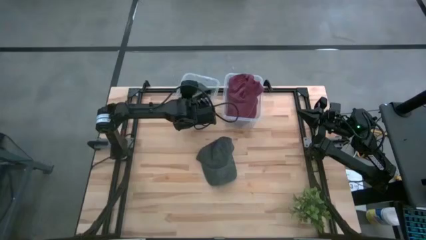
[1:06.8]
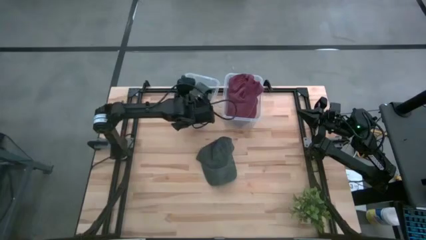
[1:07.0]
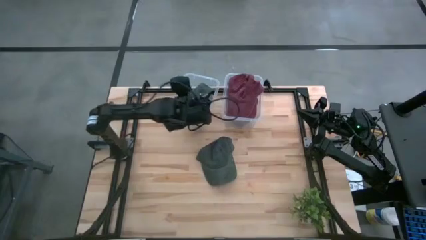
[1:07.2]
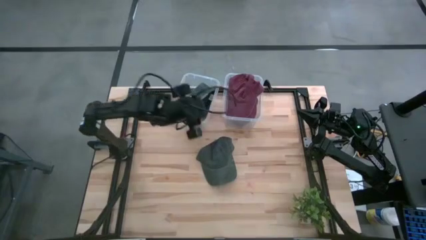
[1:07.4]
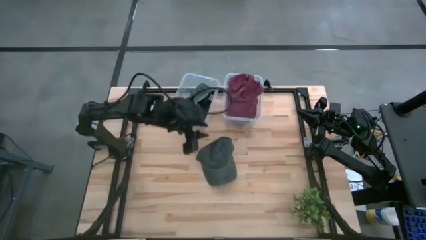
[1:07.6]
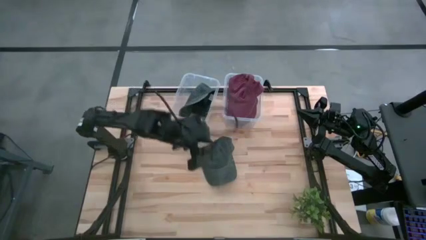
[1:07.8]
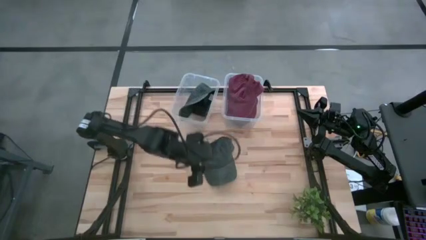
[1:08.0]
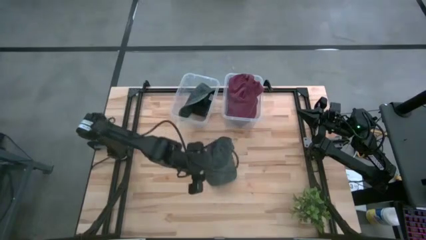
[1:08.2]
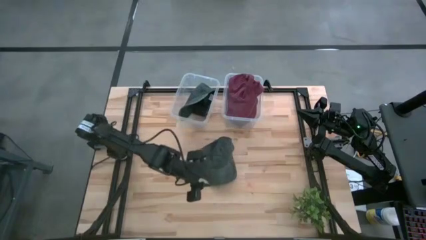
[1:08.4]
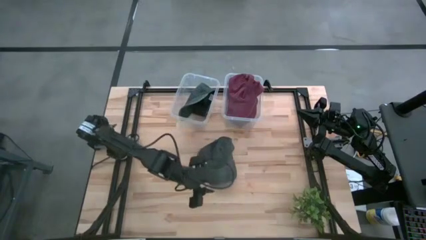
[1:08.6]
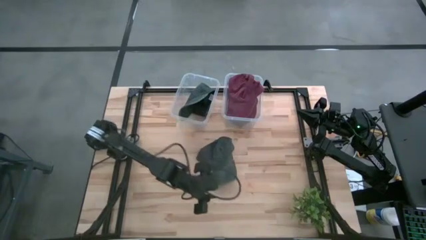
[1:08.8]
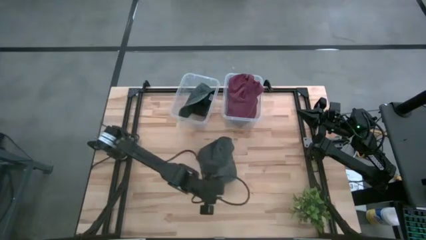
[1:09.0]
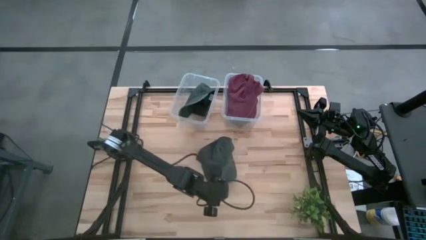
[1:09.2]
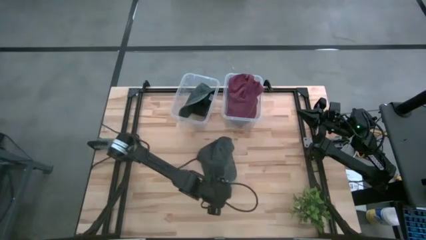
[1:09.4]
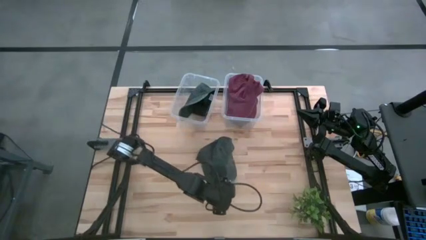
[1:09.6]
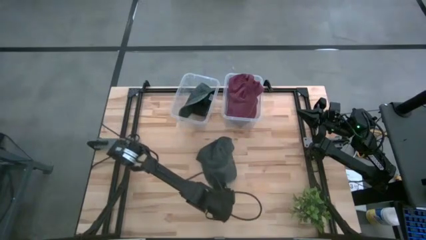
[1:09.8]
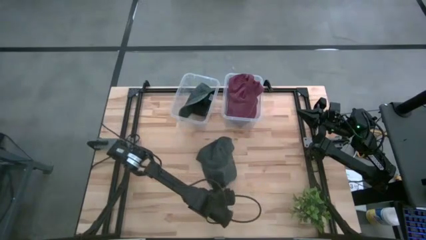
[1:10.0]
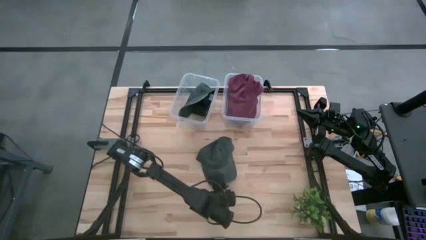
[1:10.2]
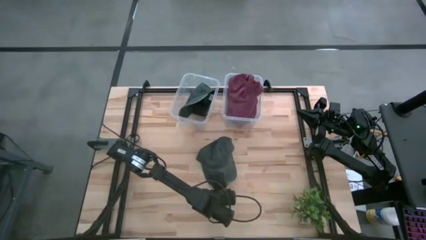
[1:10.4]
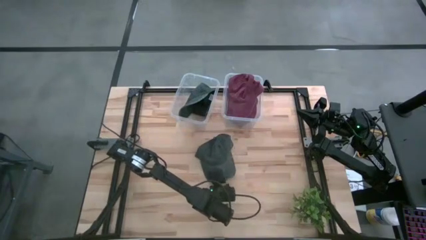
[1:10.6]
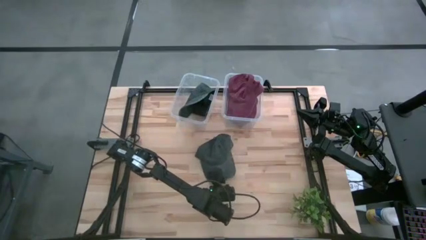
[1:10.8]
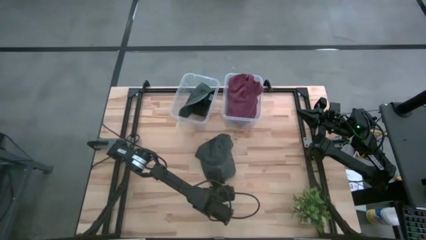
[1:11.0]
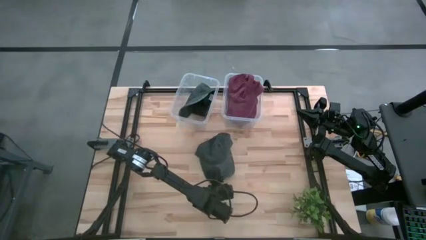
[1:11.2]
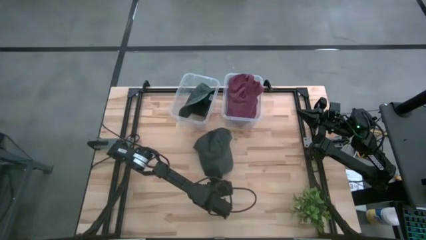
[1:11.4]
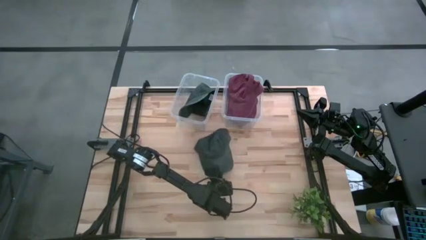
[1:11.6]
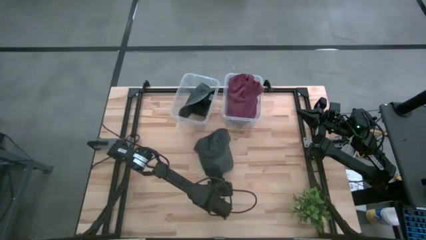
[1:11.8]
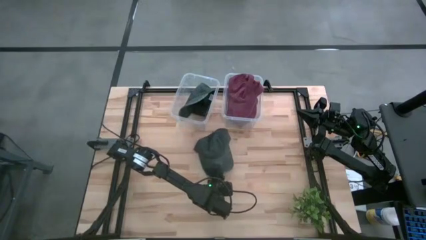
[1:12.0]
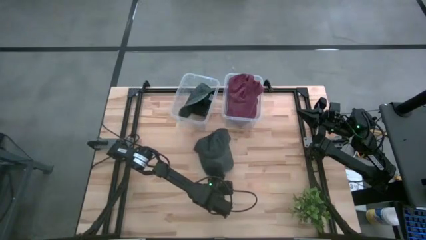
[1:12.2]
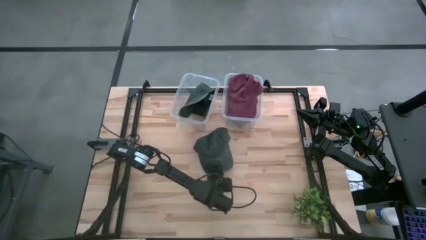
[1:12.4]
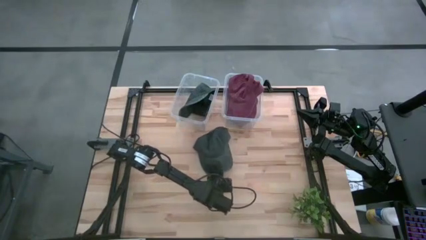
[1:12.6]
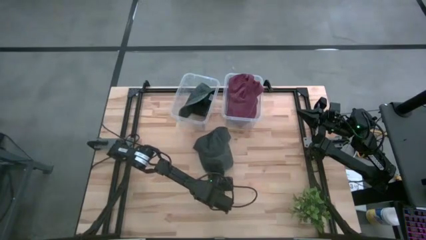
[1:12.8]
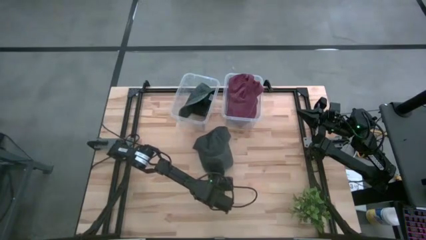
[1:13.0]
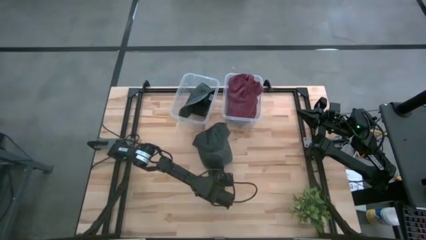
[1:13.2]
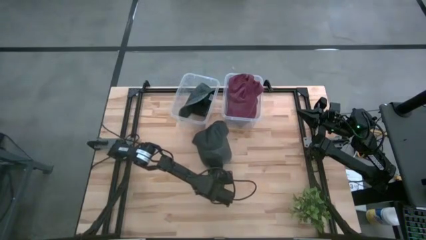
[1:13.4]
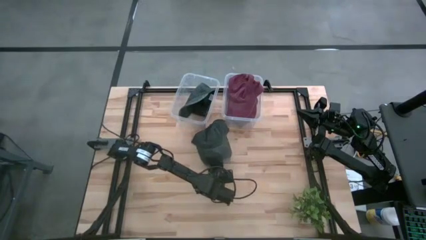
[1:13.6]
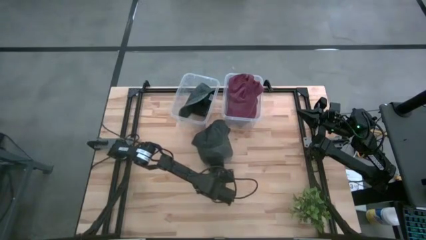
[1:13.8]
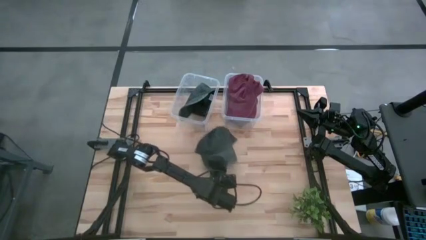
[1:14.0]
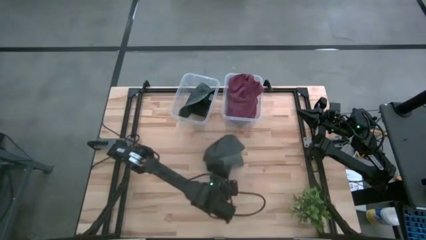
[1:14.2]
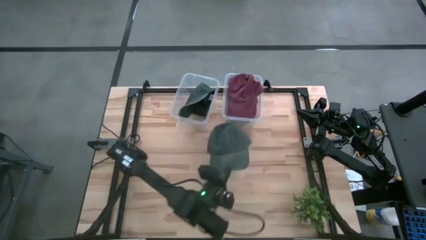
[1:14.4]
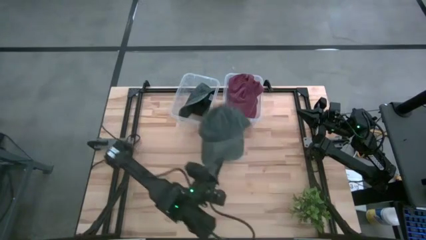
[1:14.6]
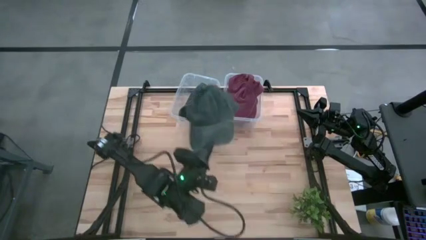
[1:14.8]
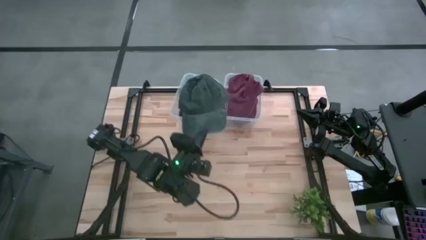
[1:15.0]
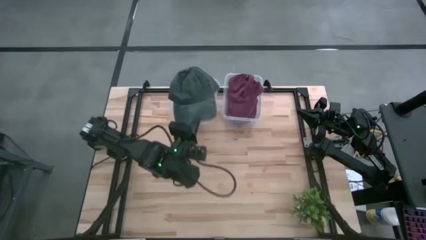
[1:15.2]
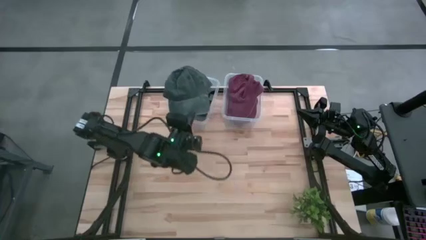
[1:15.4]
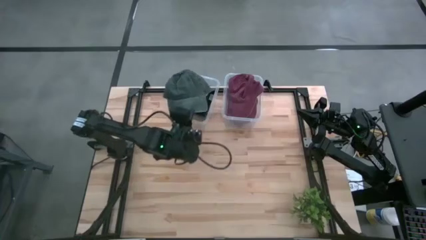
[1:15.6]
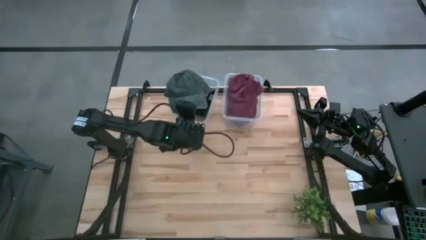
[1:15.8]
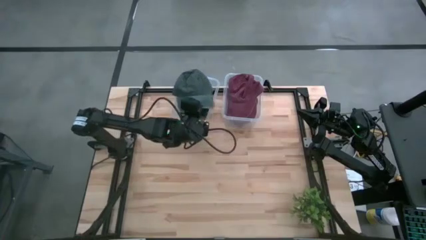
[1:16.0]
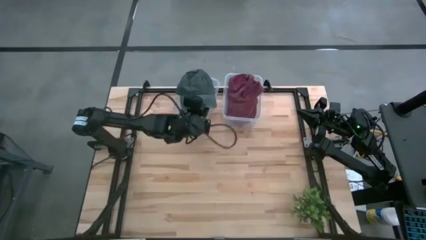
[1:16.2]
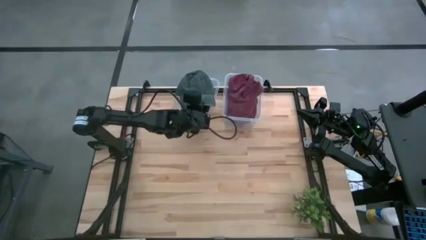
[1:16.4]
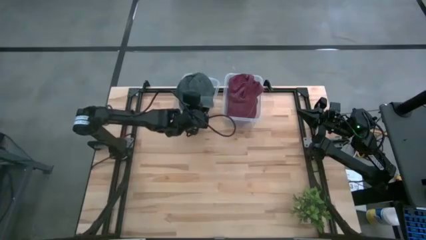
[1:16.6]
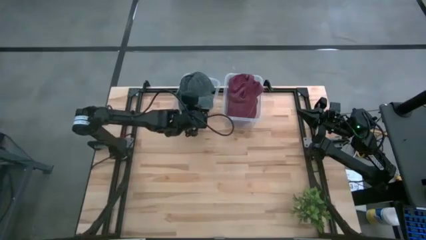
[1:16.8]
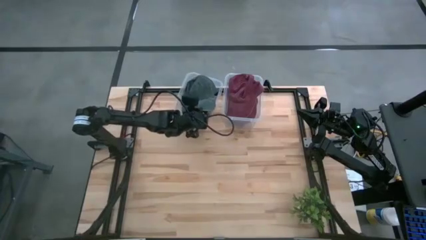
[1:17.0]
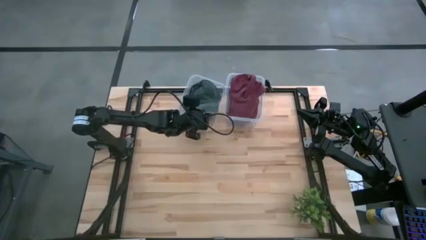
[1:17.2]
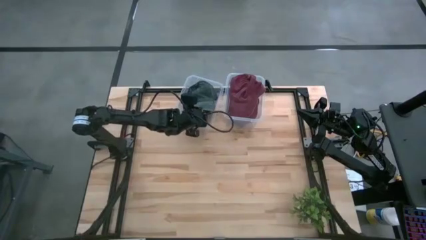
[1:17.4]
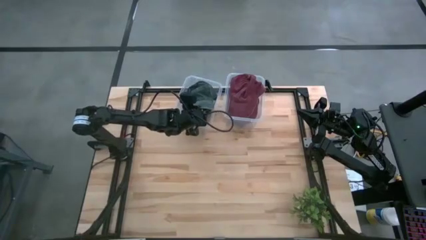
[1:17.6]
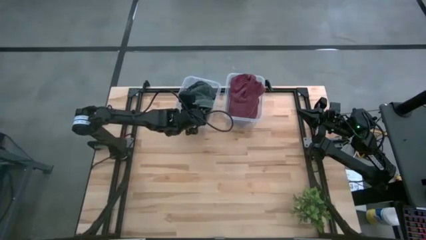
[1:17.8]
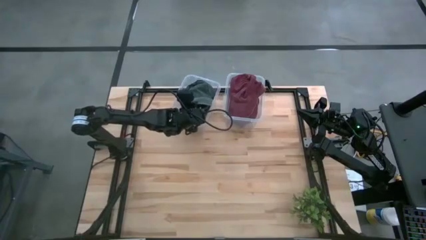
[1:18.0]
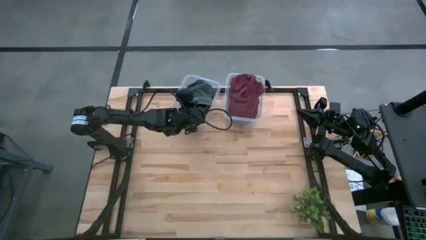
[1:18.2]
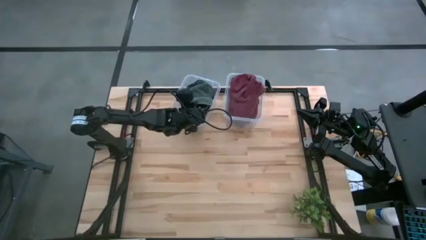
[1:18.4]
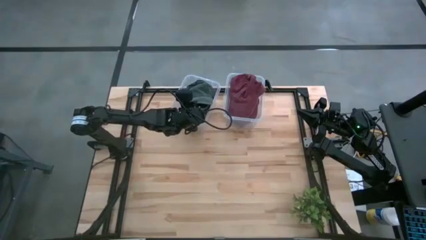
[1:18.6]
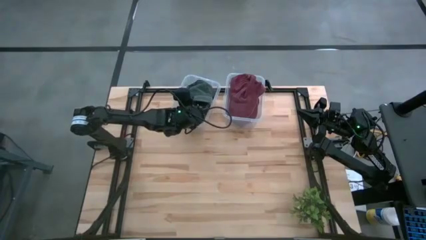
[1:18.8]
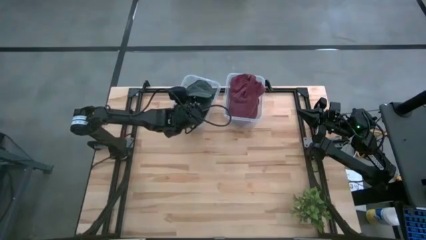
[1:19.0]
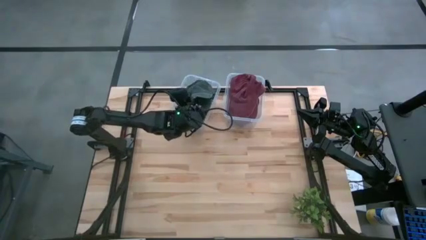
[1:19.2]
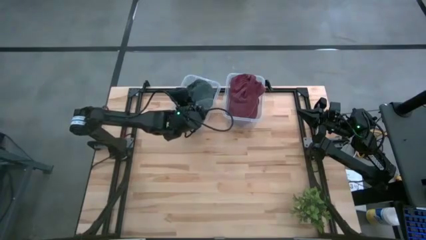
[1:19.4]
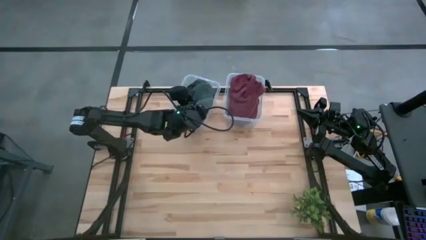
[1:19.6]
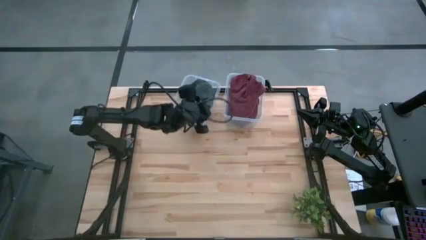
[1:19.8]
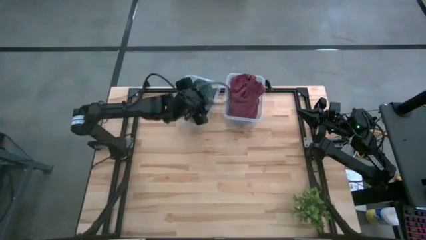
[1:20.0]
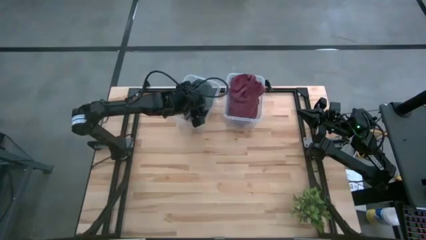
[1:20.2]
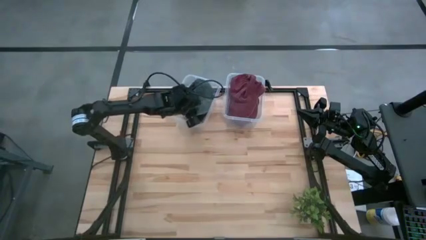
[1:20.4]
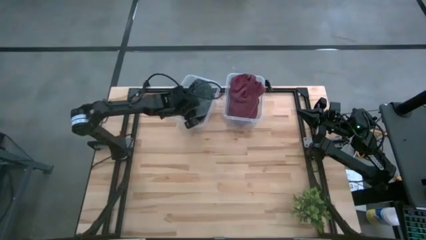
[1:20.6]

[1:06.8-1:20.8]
Task: Pick & Place hat
Put the gray cap into the left transparent bin
